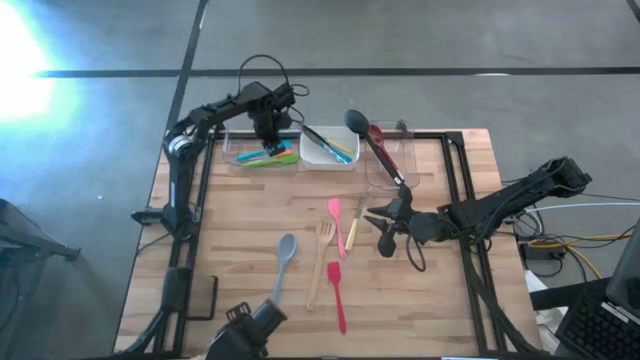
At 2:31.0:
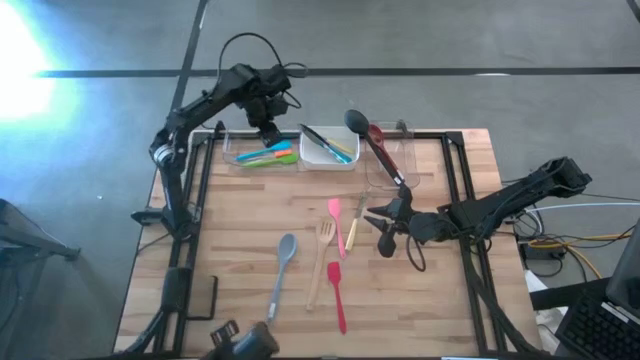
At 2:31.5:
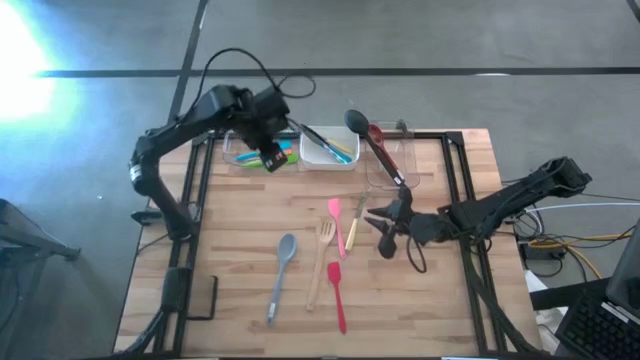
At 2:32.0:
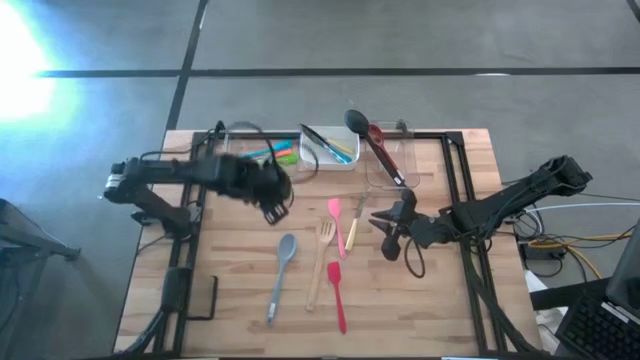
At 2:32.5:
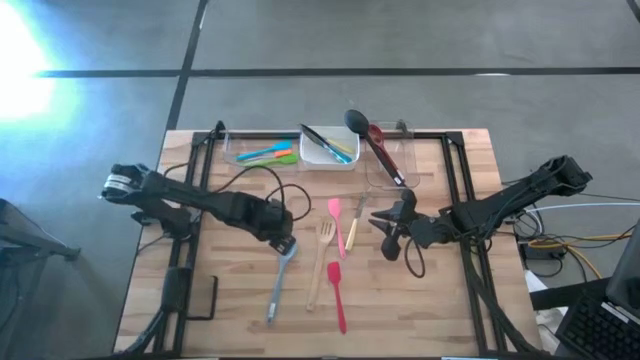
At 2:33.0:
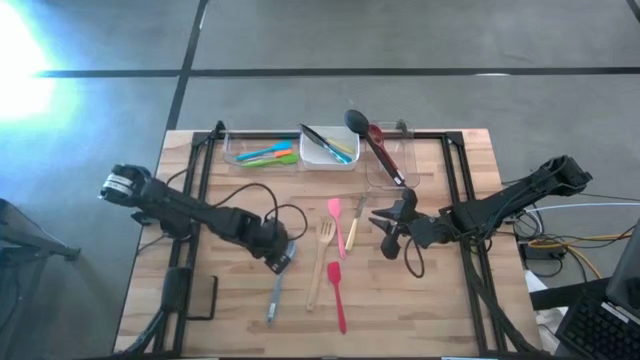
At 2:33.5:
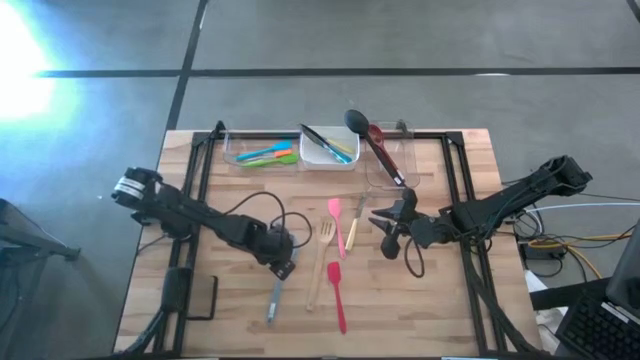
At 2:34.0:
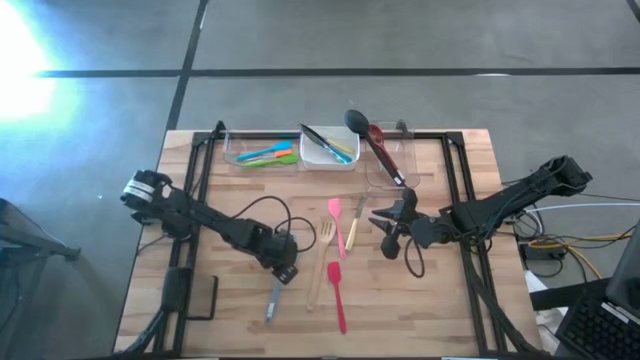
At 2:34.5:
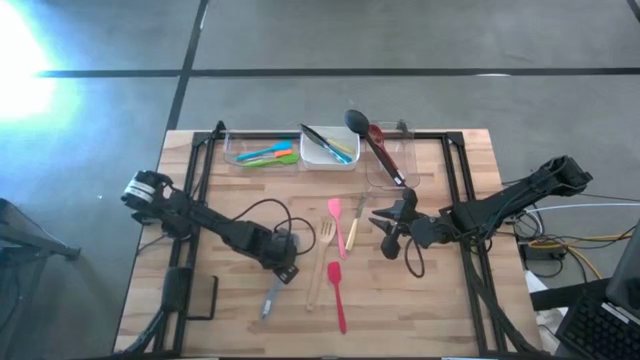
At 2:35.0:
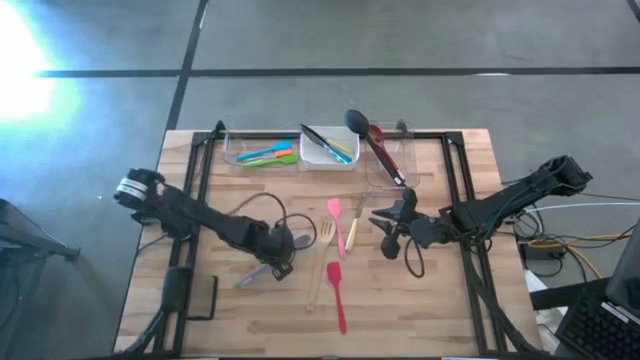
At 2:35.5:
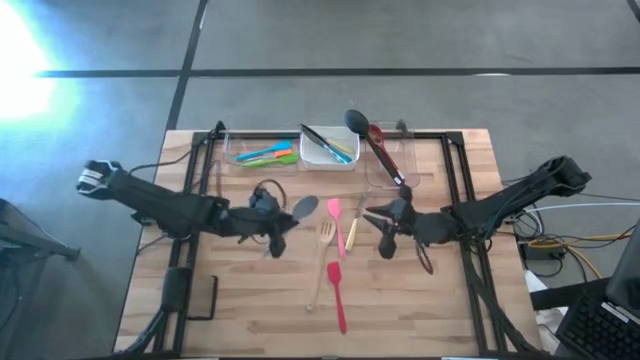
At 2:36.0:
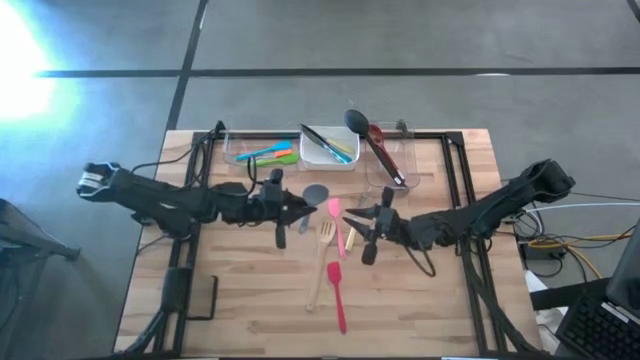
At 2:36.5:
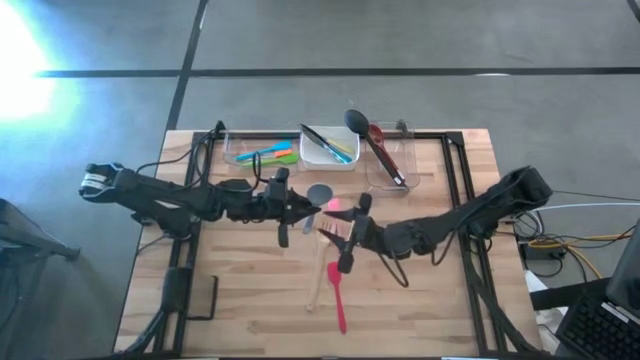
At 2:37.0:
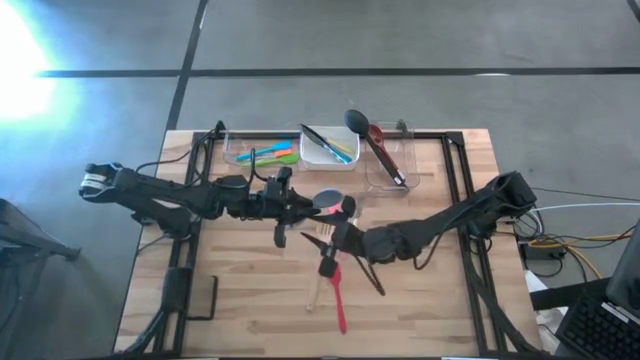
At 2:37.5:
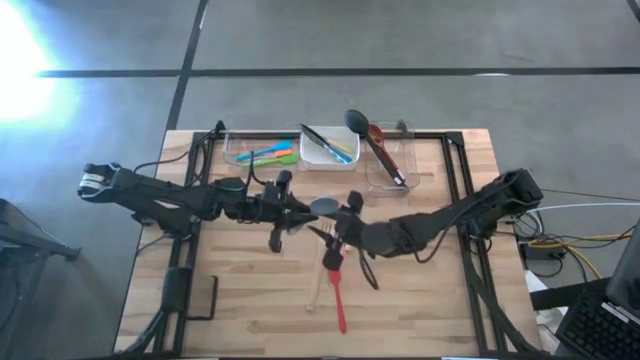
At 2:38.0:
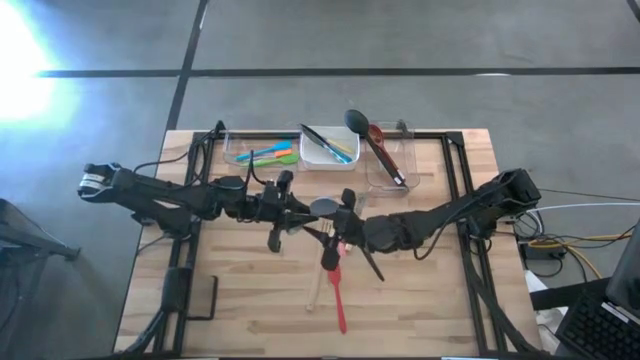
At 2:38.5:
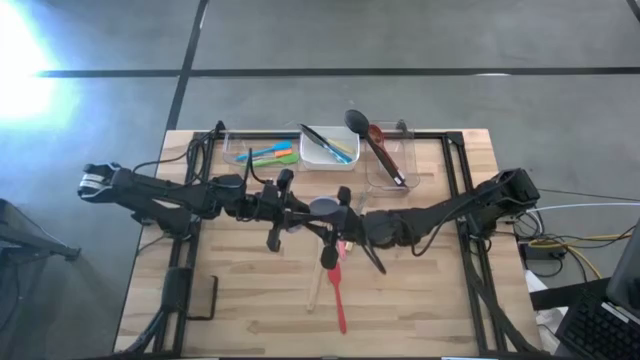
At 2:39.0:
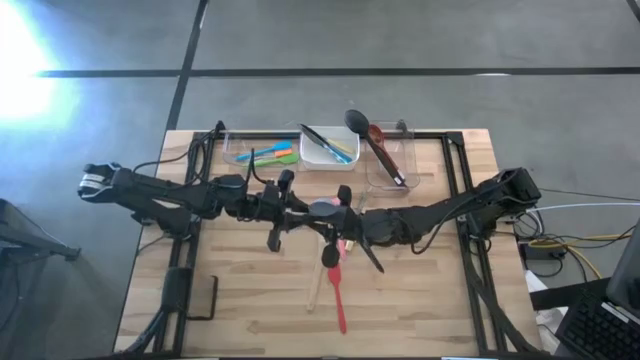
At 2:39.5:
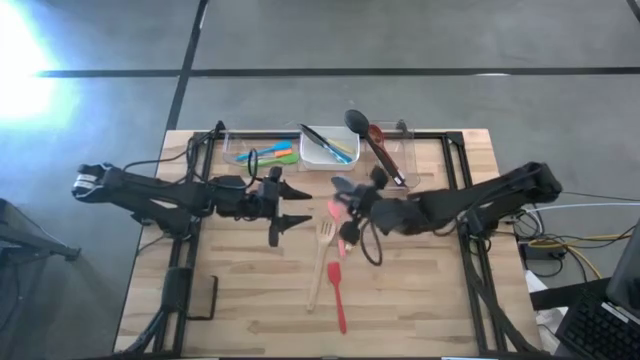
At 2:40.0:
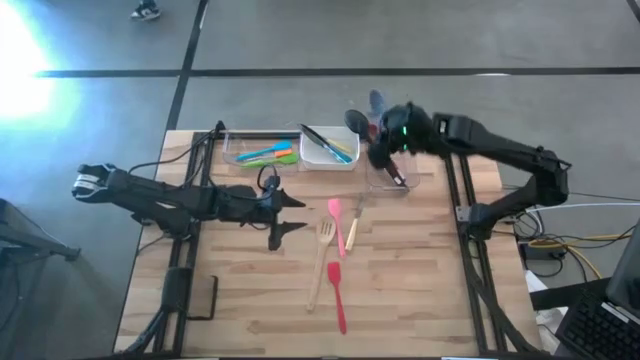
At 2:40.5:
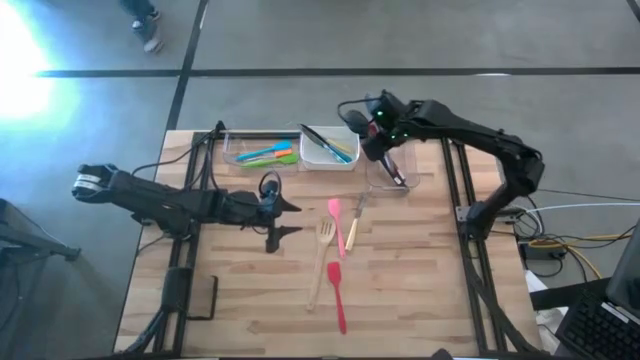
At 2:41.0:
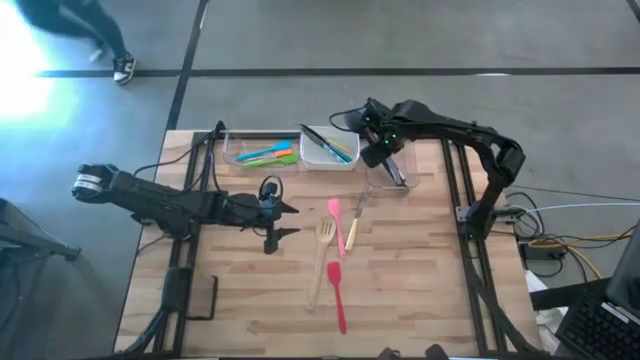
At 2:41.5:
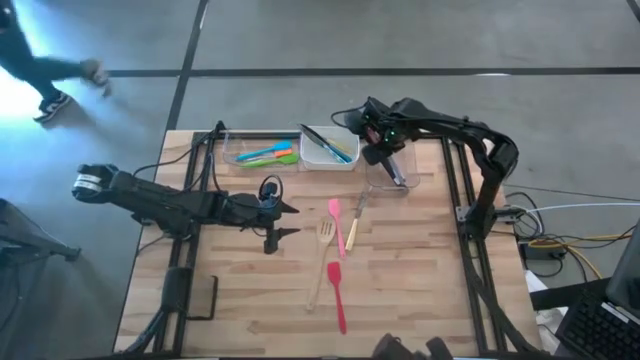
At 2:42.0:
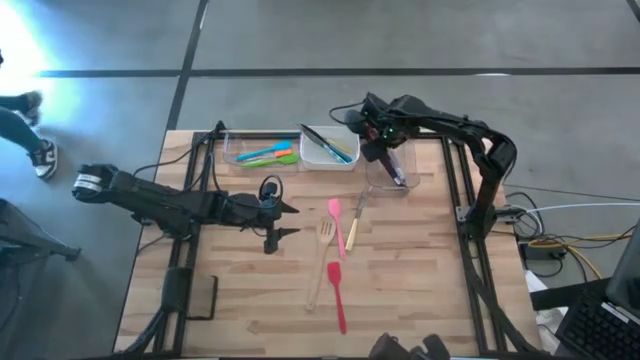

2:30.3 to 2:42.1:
Task: Pick & Place Kitchen Items
Put the gray ladle into the right transparent bin

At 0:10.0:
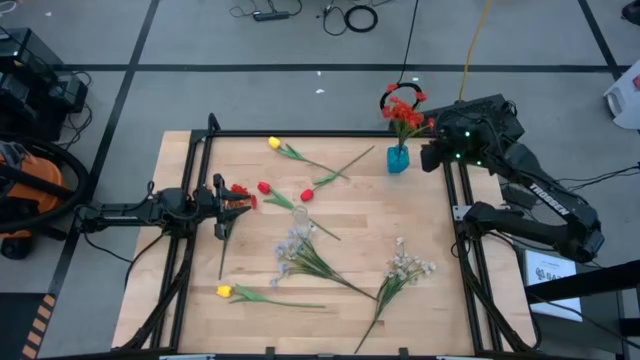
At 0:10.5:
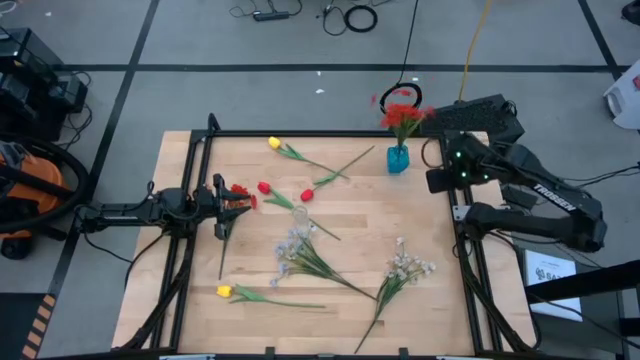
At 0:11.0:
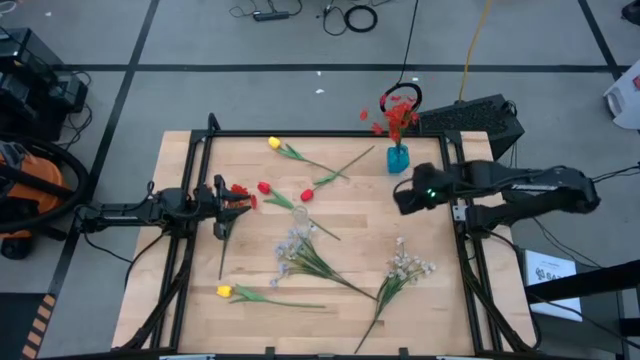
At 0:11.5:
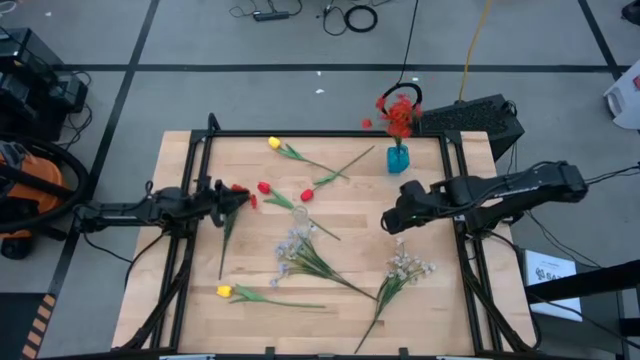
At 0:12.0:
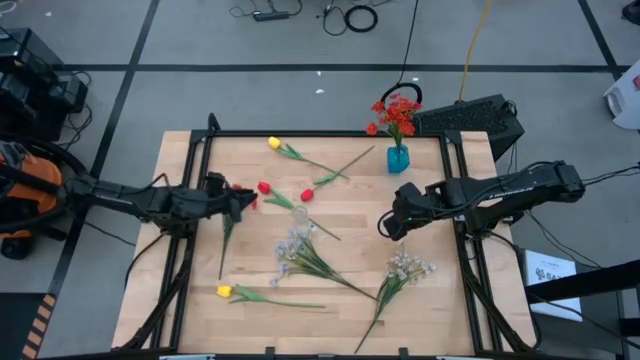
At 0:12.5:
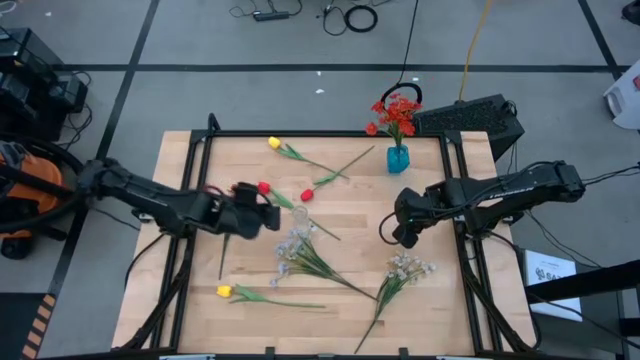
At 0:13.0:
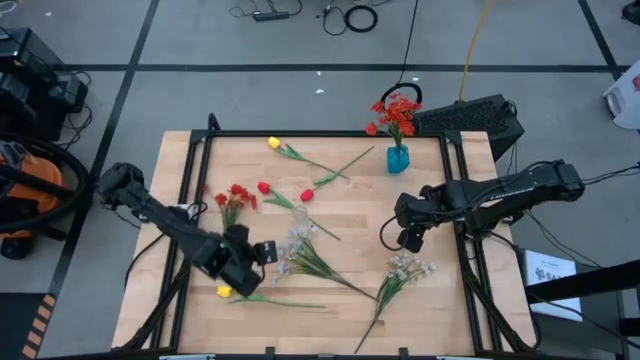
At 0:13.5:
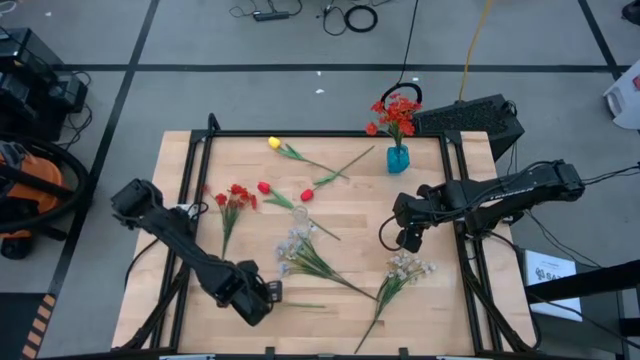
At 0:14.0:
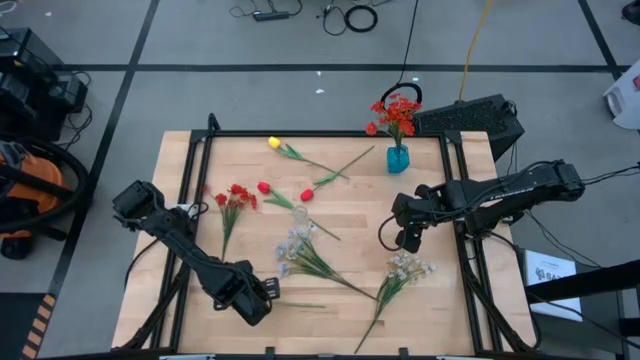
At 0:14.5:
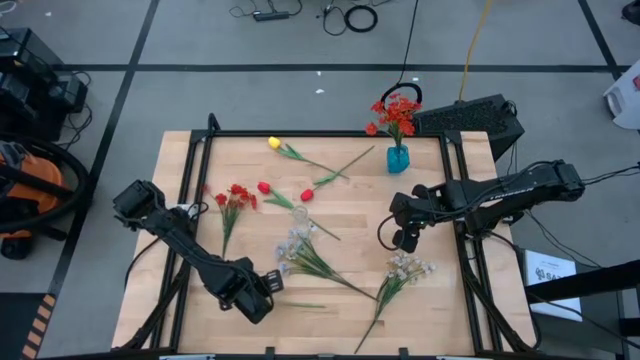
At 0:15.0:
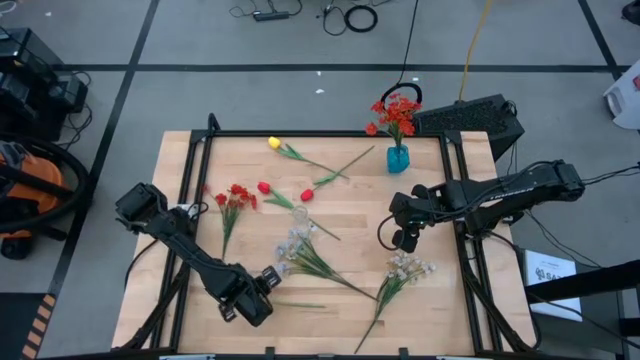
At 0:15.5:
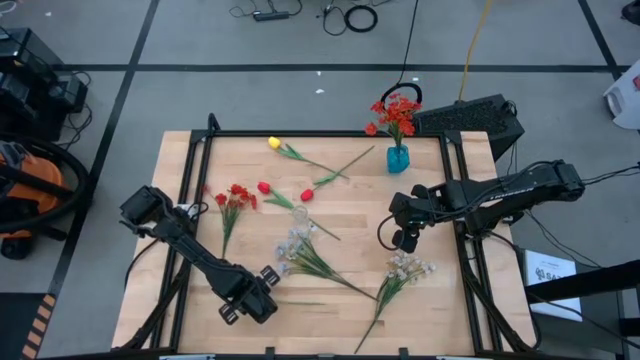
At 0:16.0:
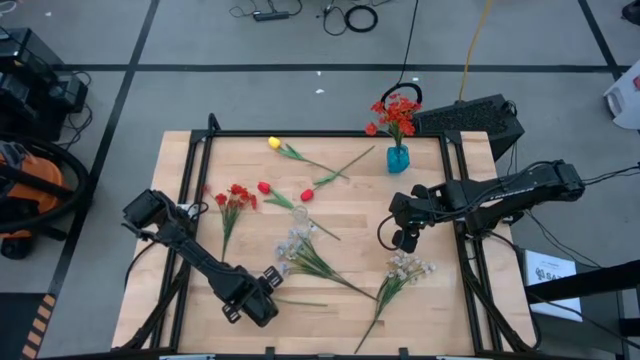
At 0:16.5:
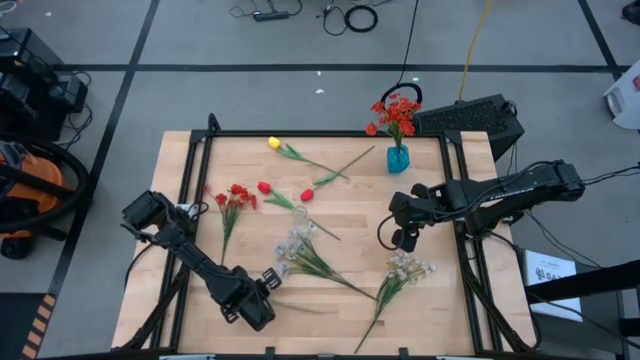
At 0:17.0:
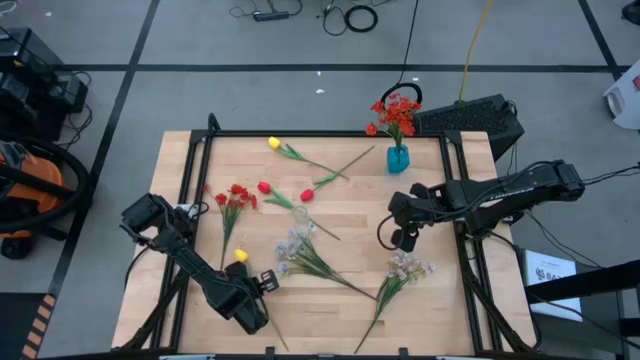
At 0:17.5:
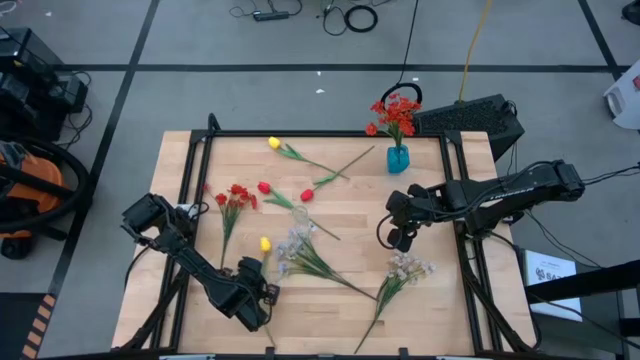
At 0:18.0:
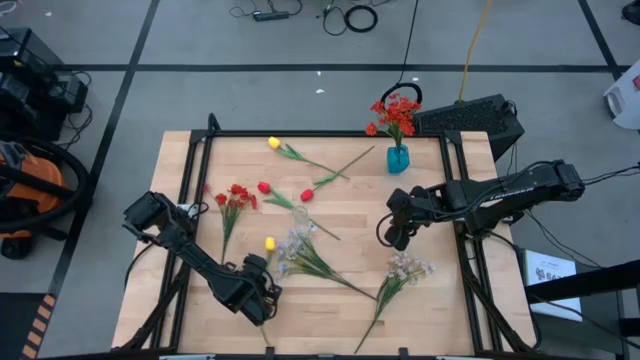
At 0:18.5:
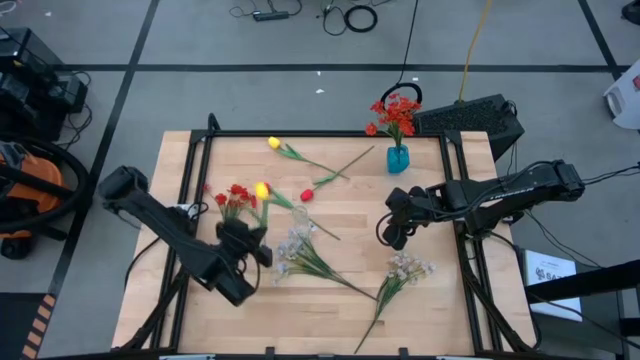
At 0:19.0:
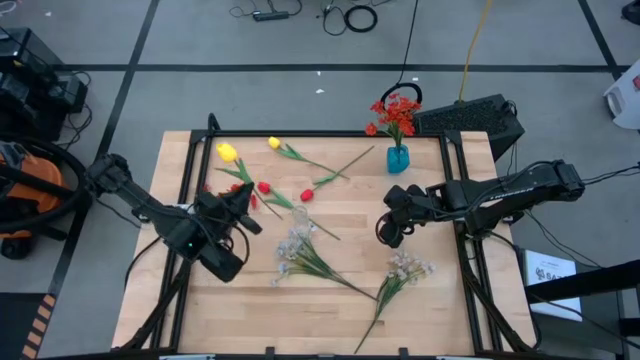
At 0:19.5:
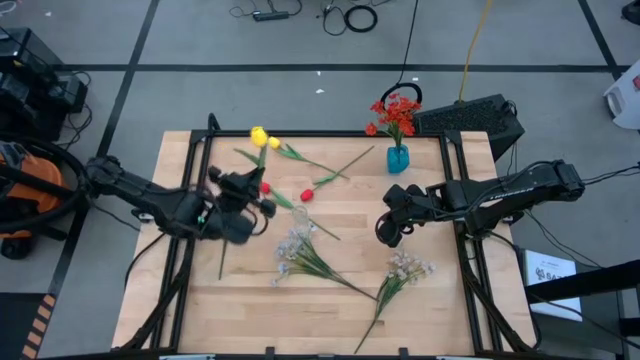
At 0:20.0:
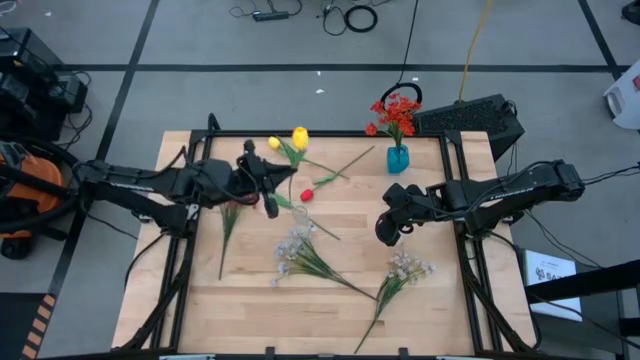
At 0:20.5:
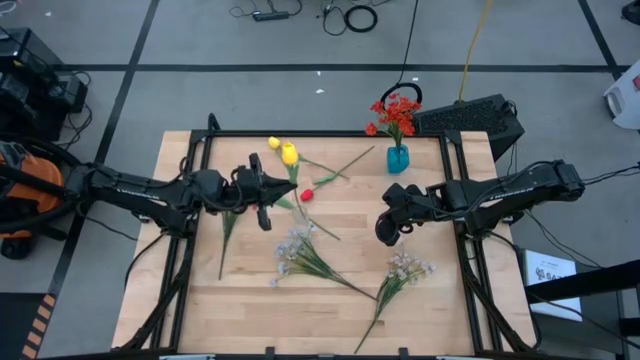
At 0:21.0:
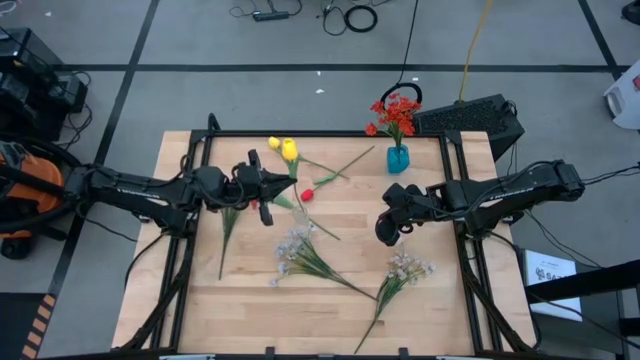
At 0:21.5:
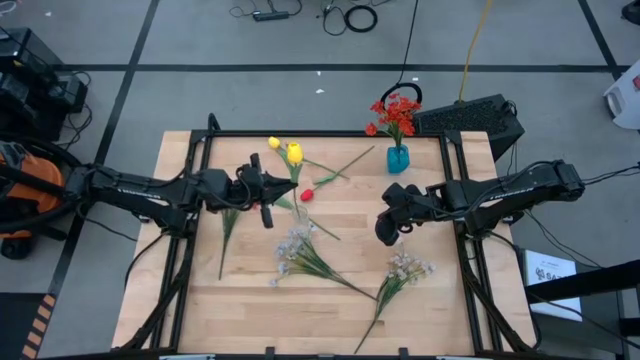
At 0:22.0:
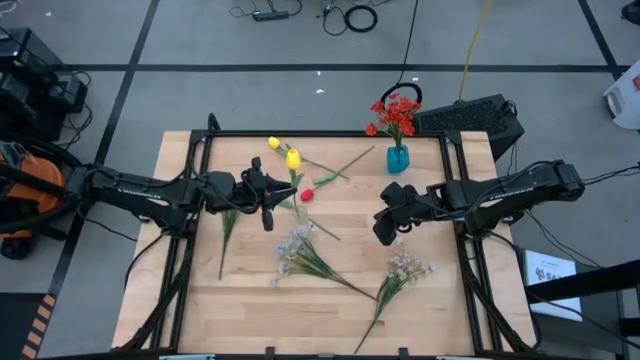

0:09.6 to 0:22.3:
Task: Sort flowers into vase by color
Put the bottom yellow flower into the transparent flower vase
